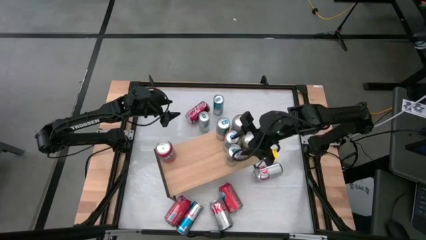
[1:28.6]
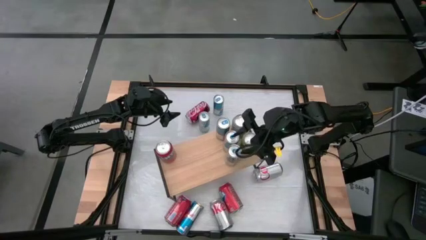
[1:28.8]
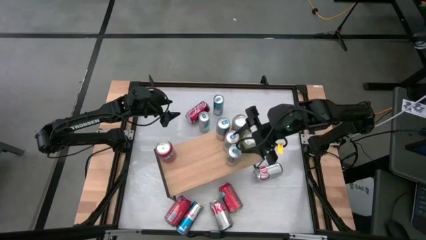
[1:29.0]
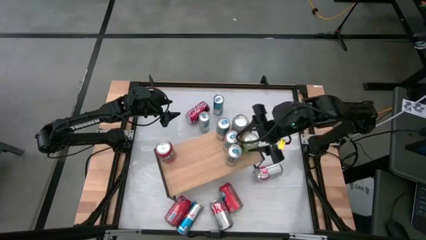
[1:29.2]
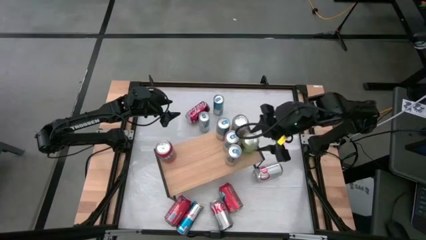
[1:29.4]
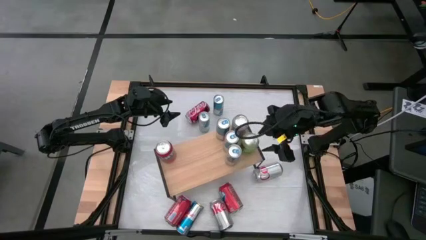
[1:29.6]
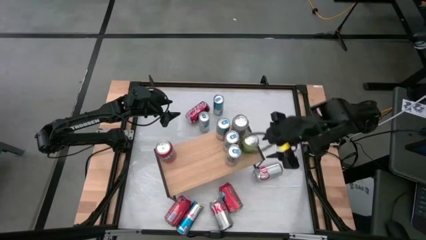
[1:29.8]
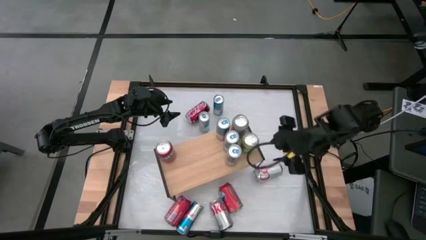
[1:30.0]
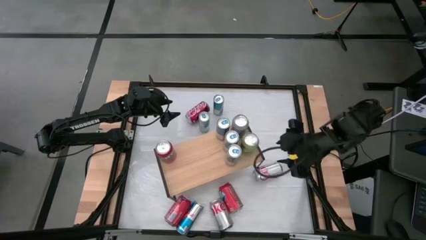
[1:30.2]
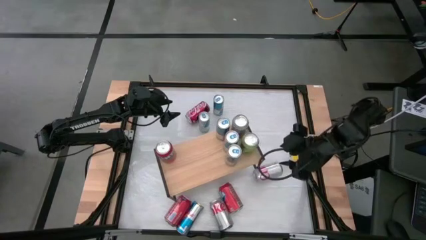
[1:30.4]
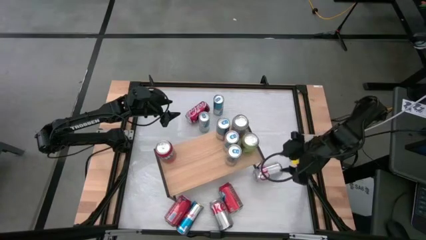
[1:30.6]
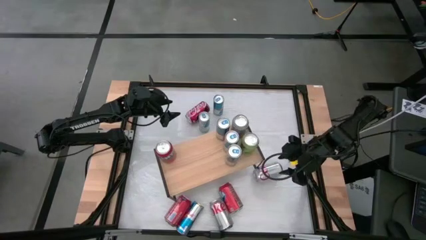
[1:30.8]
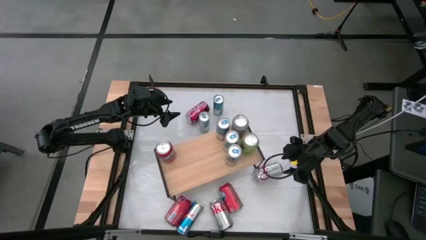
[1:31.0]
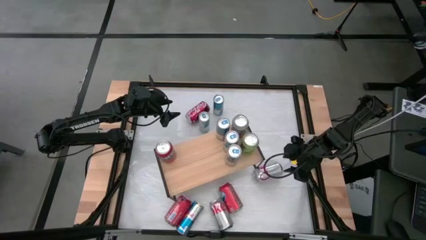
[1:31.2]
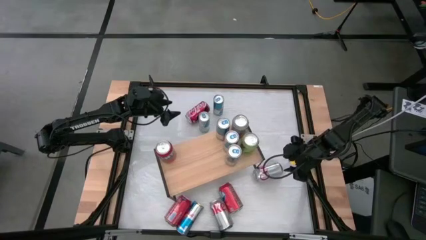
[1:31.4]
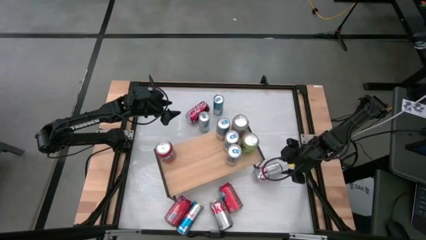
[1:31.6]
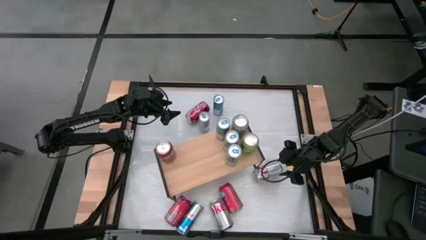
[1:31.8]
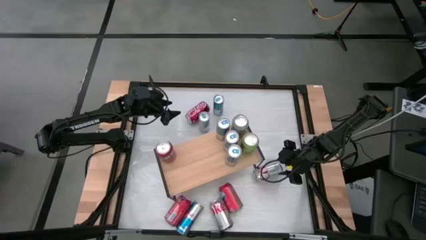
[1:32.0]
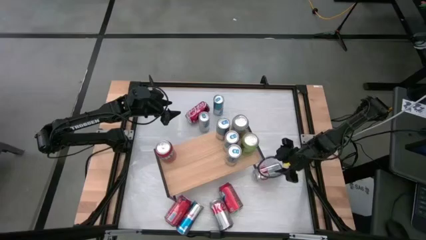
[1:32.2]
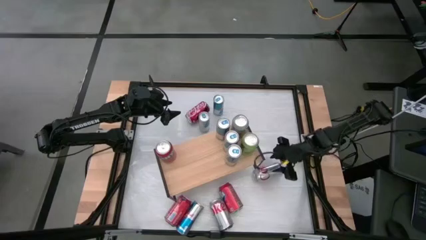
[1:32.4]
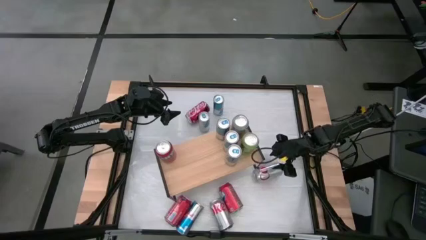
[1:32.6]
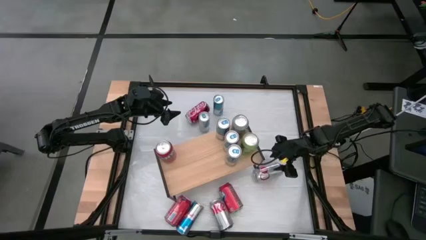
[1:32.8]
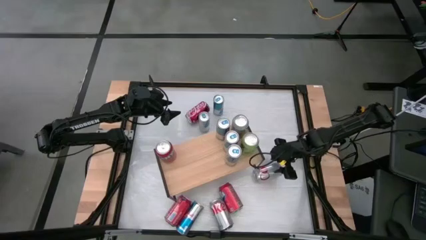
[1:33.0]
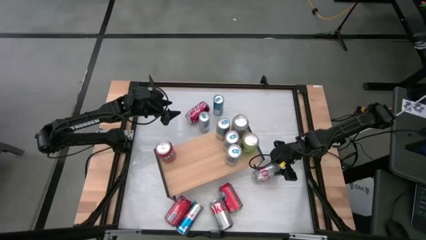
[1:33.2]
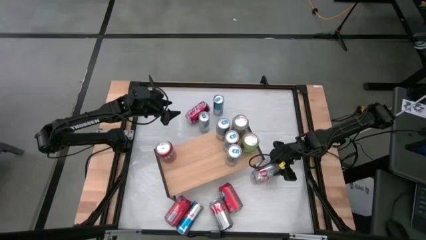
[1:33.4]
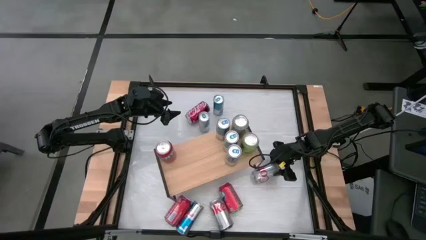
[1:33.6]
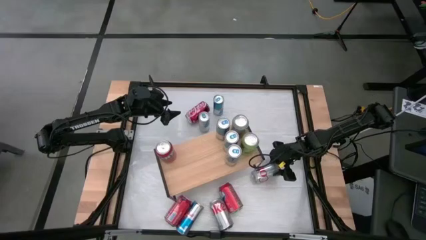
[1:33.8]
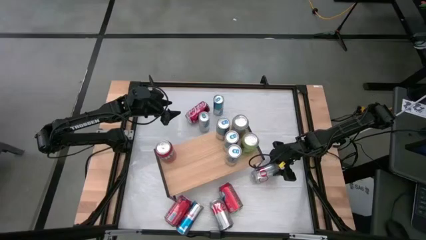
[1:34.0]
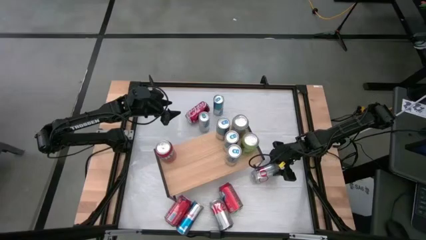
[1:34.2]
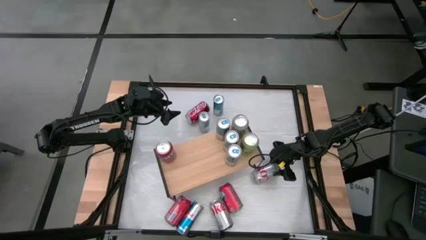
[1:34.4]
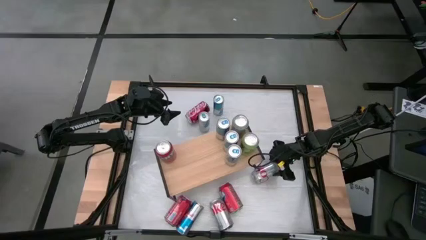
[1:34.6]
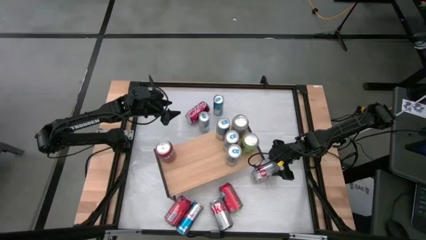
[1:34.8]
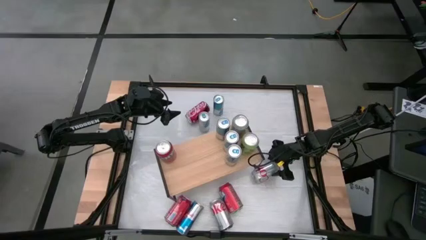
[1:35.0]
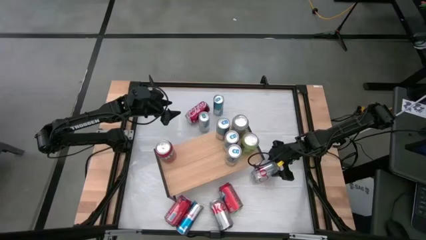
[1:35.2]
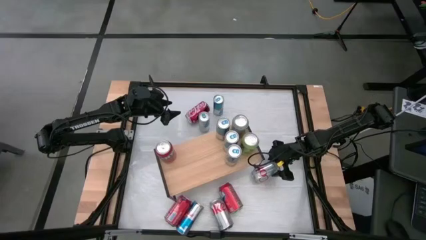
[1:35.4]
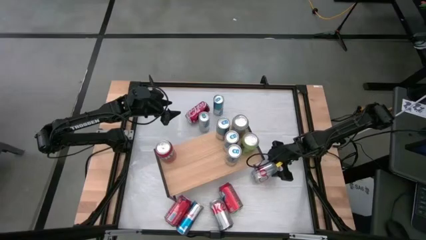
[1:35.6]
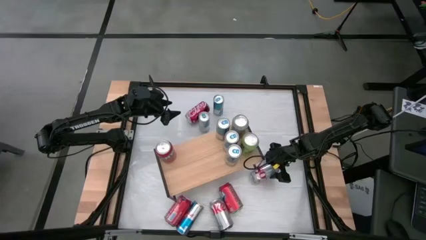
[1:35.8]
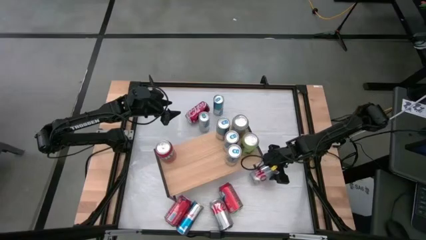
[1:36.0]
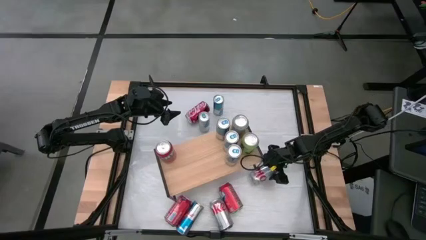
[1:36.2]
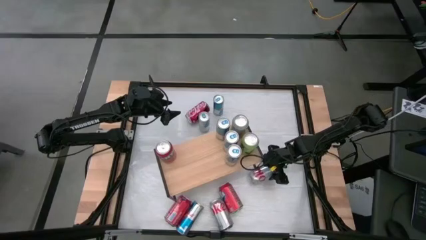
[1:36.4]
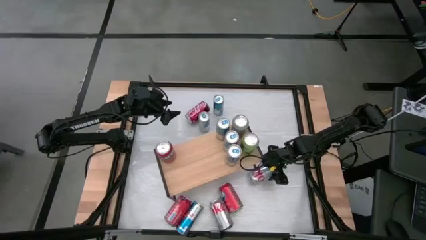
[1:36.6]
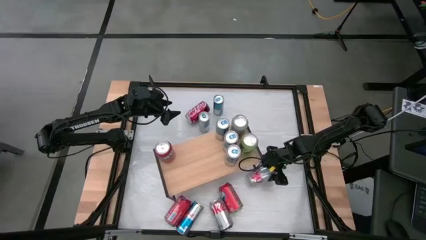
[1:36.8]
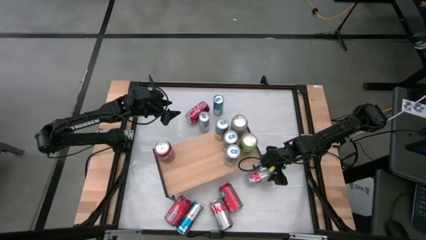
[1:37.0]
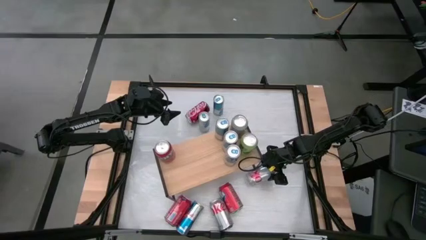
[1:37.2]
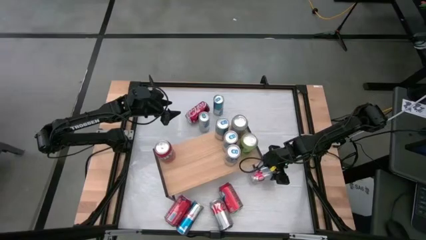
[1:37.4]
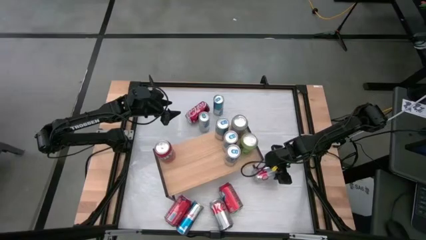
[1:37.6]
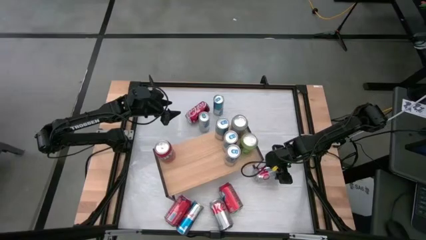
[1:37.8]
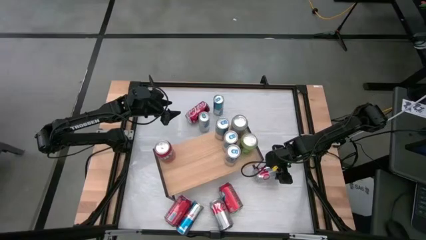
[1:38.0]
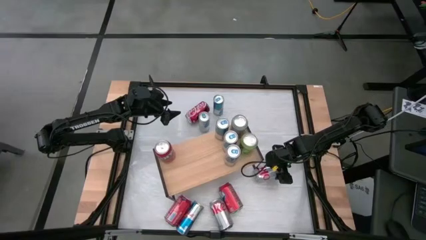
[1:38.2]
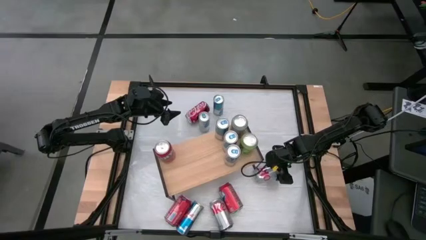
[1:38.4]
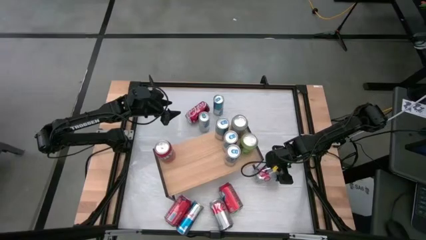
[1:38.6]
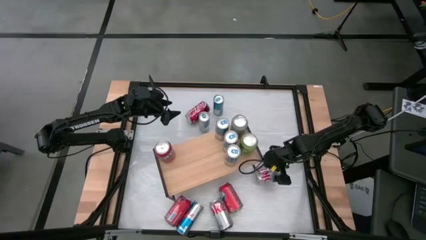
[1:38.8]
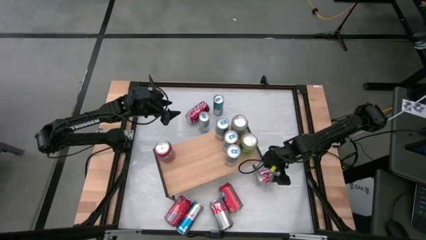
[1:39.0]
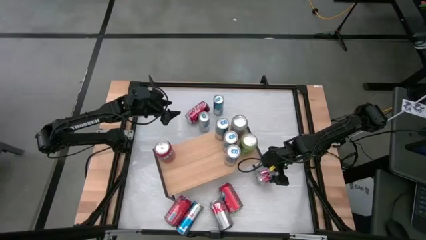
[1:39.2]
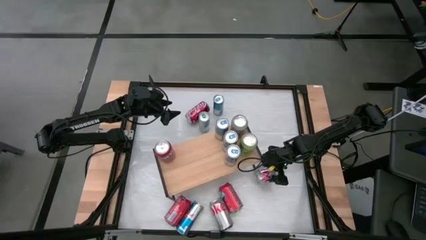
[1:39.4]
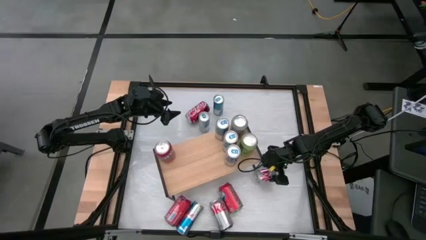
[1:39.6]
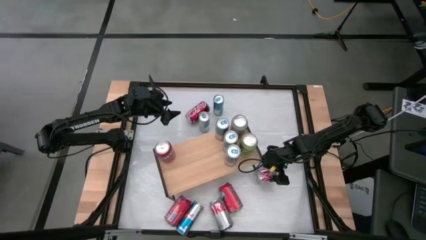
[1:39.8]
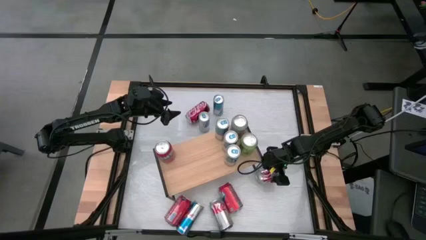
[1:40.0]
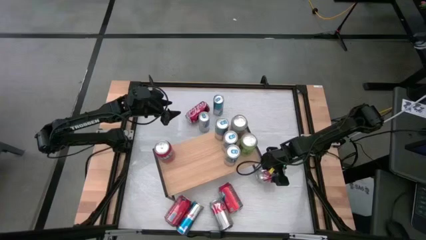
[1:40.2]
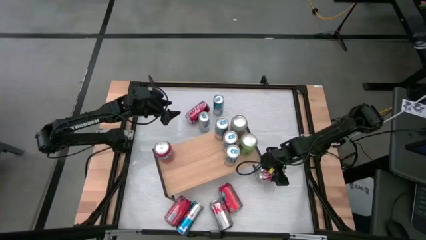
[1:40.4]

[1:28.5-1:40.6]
Task: Place canned beverage on shelf
Put the red silver soda can on the shelf

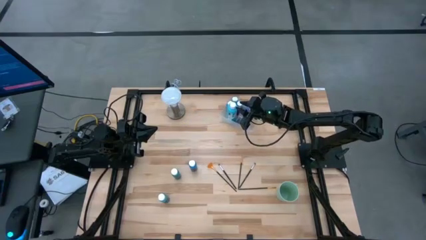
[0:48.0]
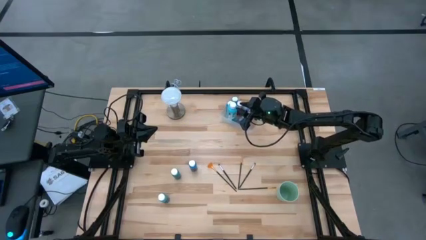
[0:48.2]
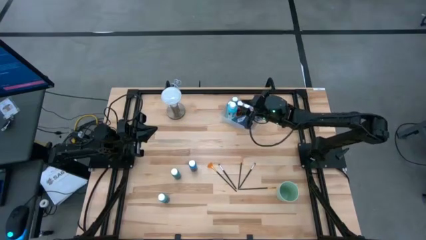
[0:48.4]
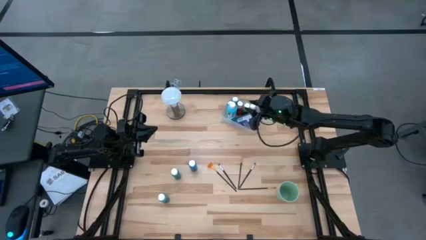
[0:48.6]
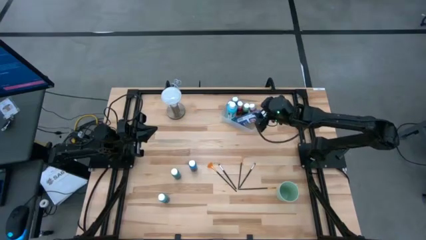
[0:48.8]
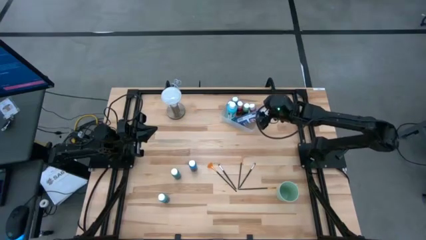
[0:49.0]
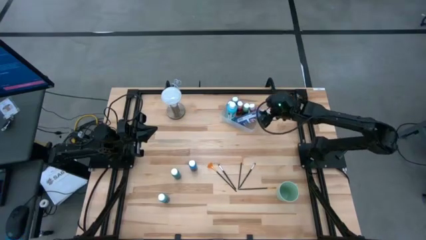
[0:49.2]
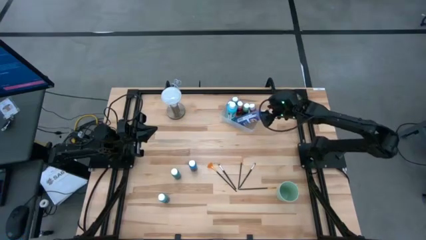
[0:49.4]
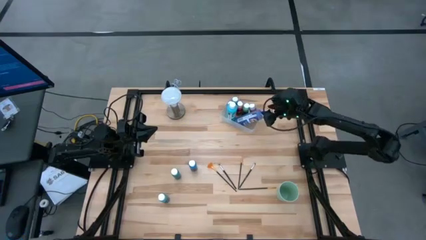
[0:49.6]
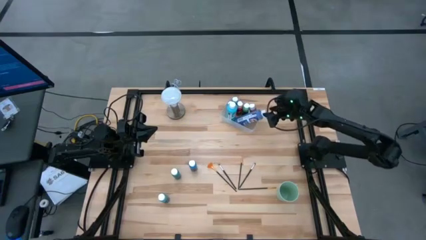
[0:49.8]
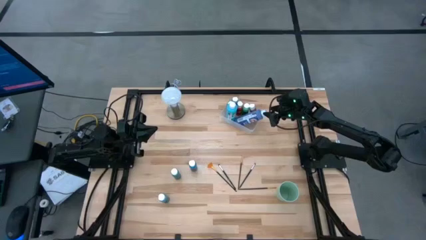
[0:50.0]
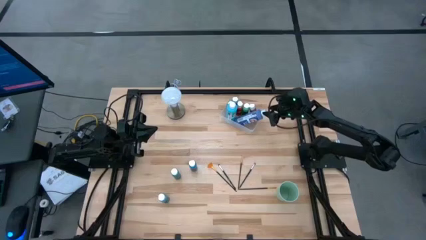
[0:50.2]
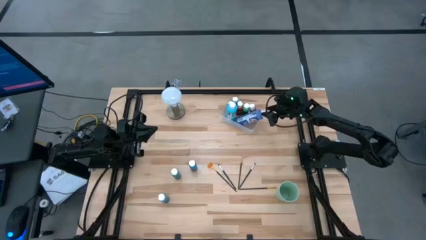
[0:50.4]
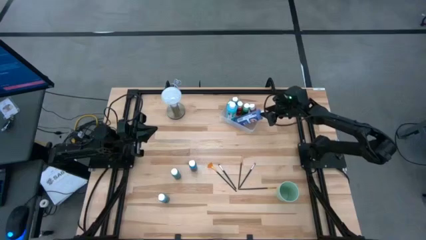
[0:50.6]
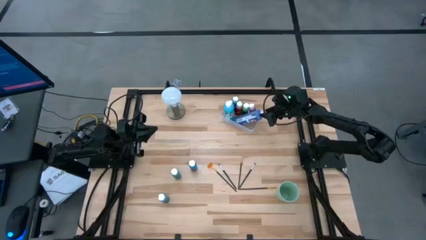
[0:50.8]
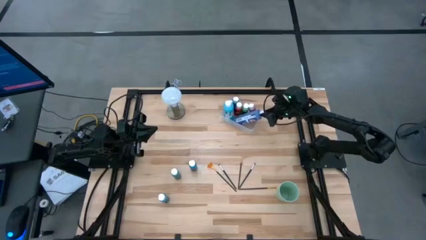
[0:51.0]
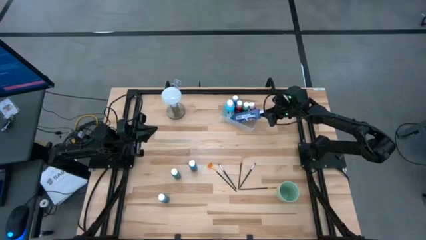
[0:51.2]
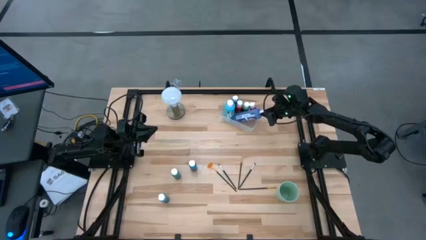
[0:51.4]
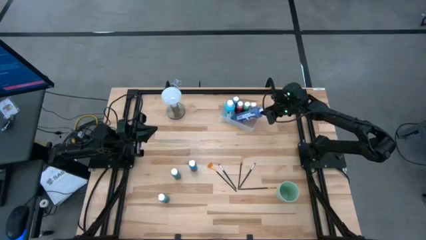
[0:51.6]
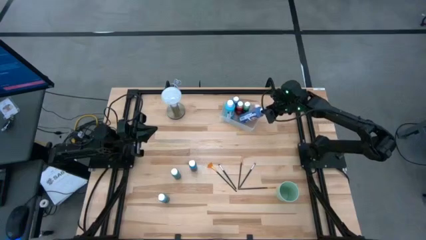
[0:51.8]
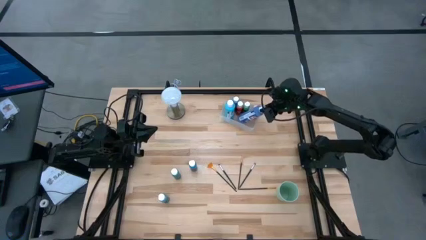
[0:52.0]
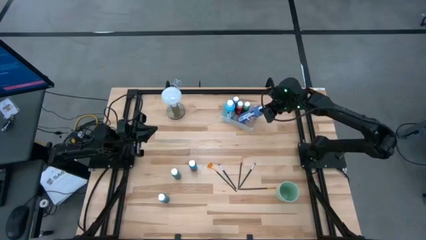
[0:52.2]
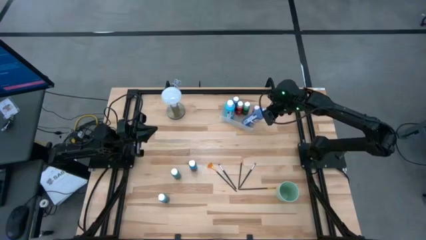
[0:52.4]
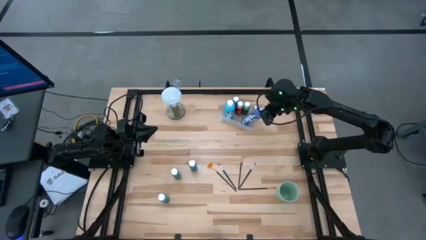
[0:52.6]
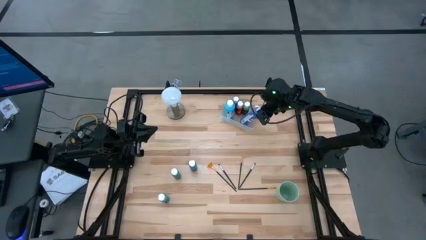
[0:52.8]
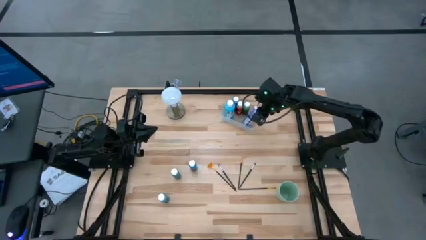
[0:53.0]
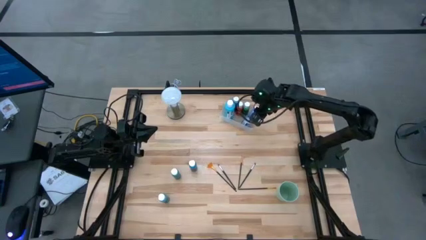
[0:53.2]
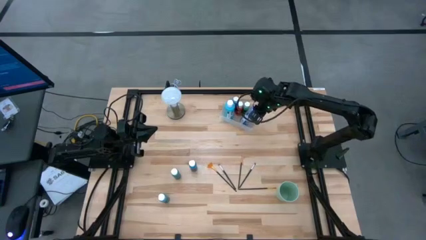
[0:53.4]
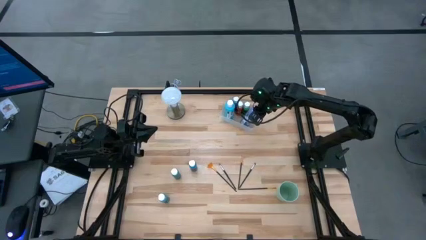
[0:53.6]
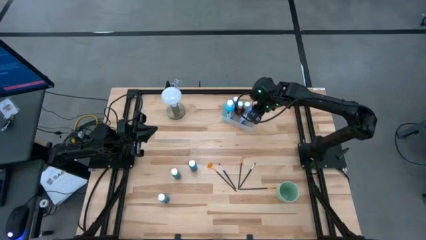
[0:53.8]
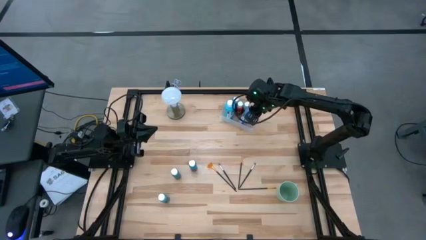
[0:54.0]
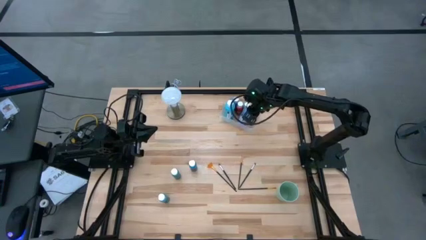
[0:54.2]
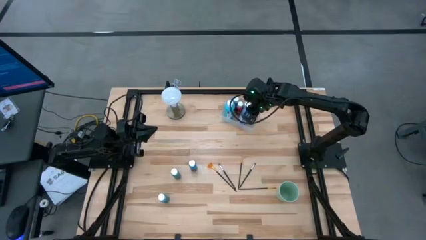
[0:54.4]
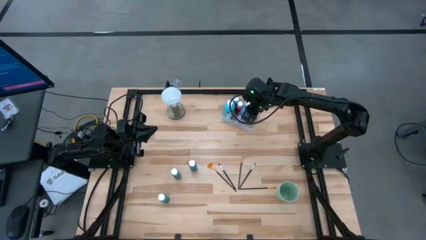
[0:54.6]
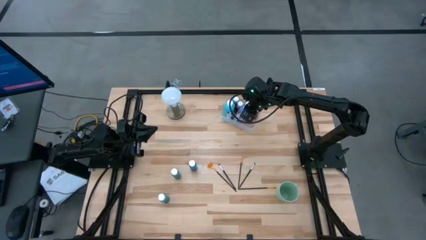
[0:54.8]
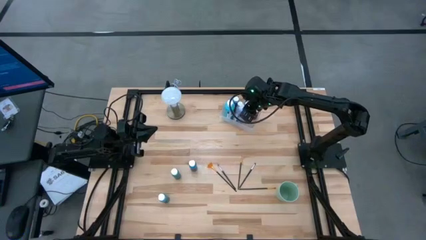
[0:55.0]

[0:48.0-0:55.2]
Task: Pick & Place Paint Supplies
Put the large blue paint bottle into the transparent bin
